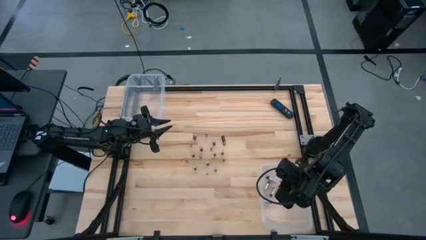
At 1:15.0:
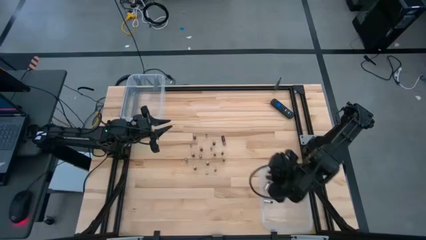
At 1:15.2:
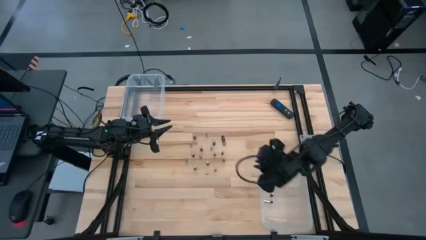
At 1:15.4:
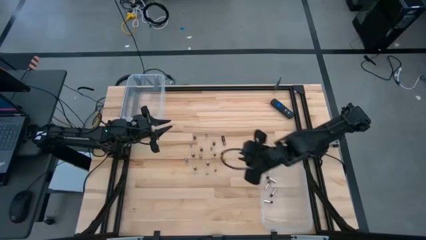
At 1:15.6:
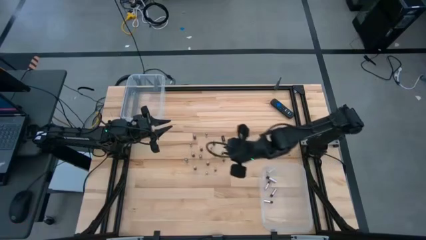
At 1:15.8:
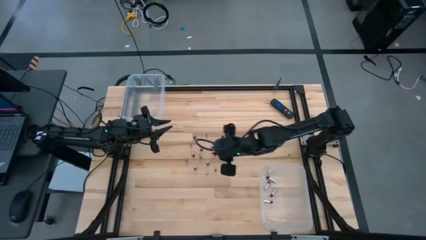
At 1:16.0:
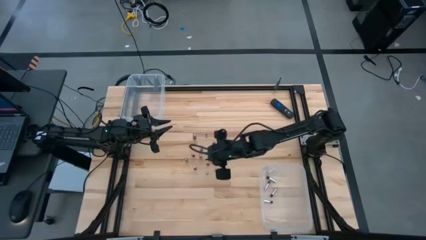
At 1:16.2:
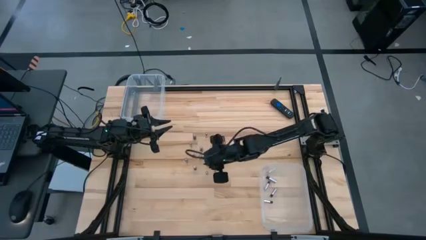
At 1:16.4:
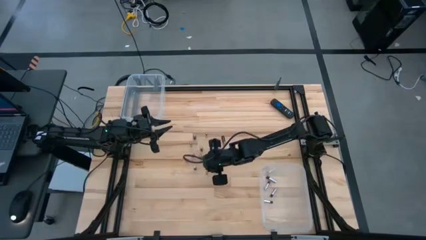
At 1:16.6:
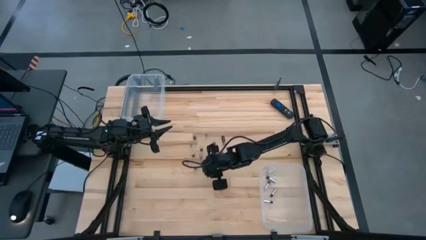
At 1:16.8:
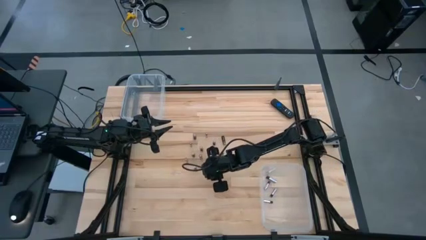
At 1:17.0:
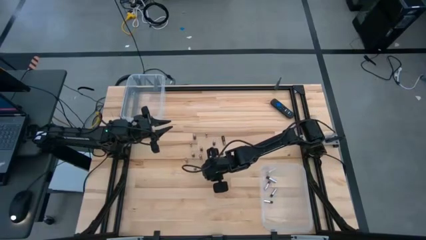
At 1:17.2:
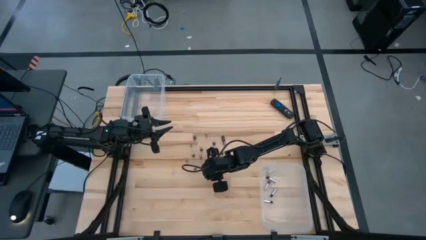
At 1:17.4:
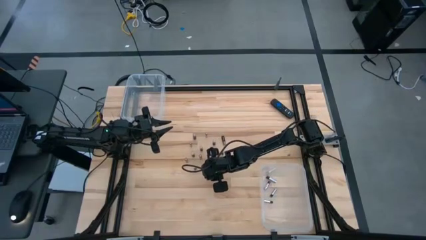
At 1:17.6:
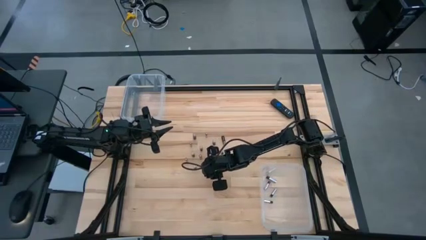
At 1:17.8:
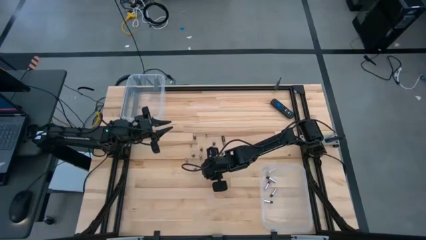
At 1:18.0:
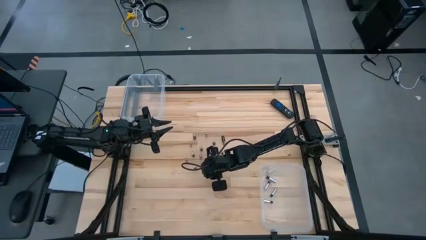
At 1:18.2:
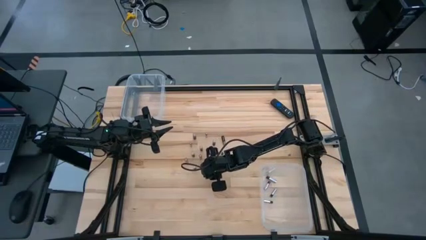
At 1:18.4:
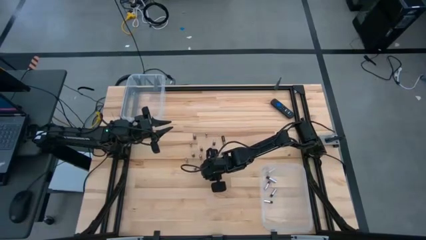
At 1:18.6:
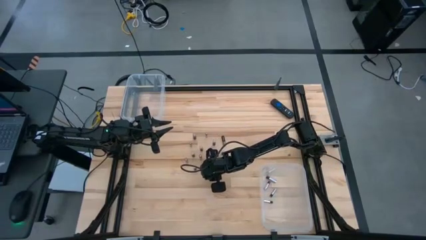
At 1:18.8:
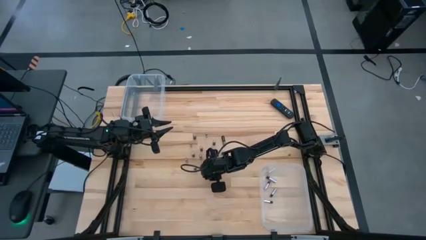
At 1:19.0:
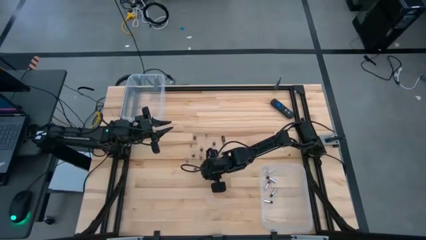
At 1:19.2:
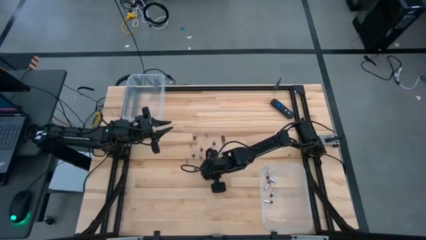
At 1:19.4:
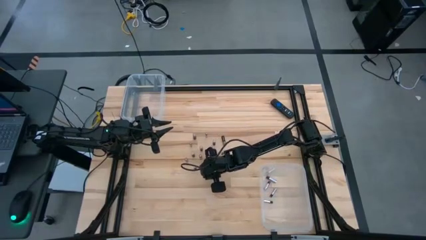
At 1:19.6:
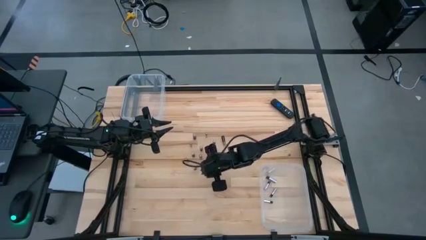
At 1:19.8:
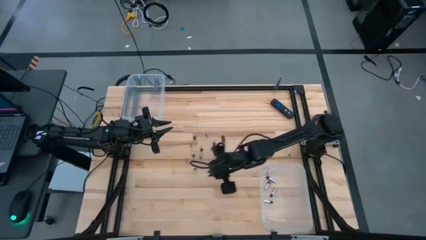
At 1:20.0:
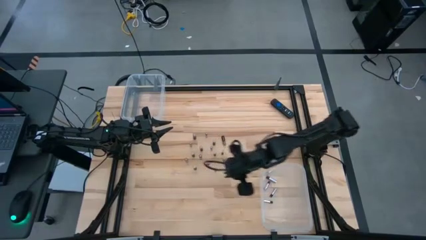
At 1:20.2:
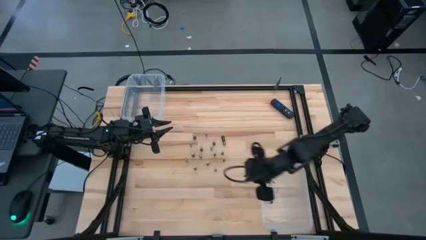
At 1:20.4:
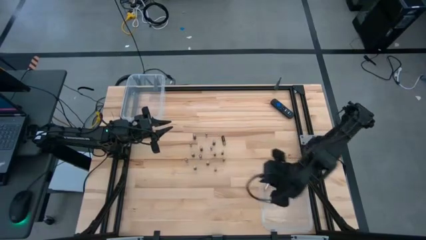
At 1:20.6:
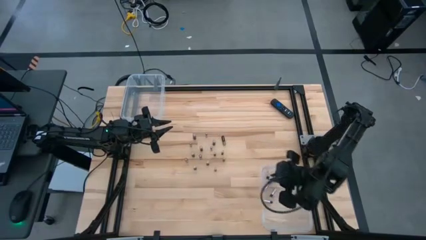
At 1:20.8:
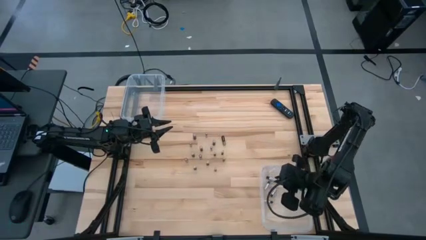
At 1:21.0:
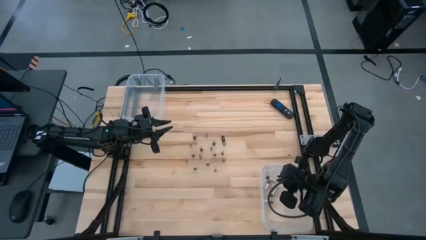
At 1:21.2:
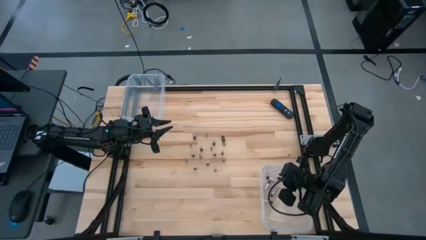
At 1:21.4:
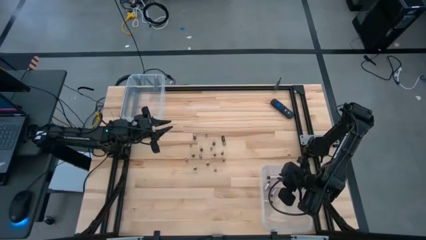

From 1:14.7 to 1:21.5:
Task: Sort batteries
Put the black and silver battery into the bottom transparent bin

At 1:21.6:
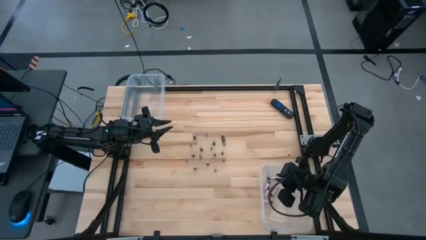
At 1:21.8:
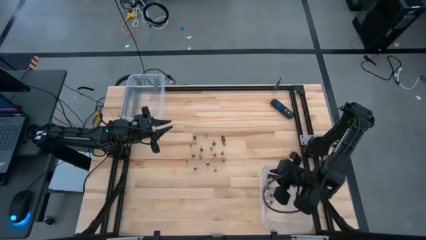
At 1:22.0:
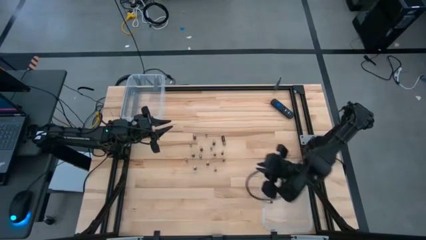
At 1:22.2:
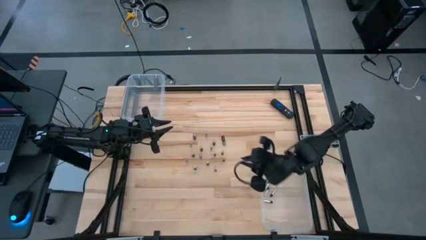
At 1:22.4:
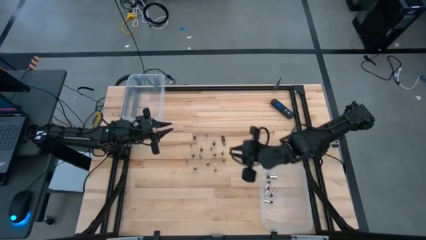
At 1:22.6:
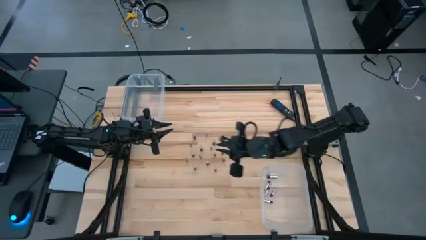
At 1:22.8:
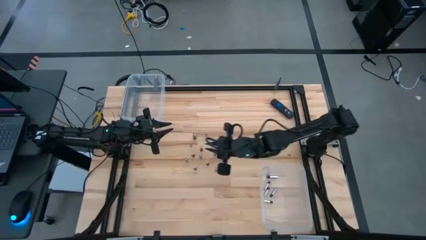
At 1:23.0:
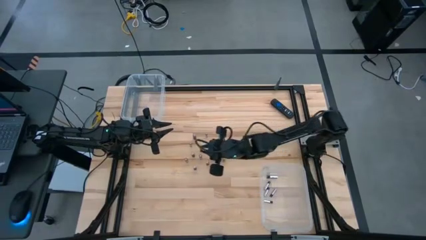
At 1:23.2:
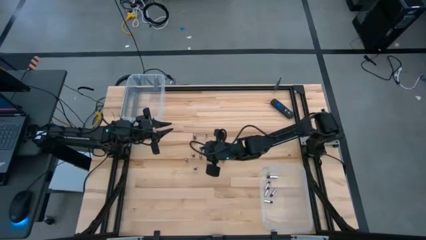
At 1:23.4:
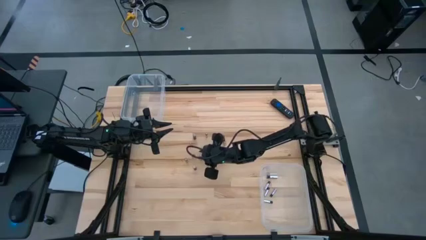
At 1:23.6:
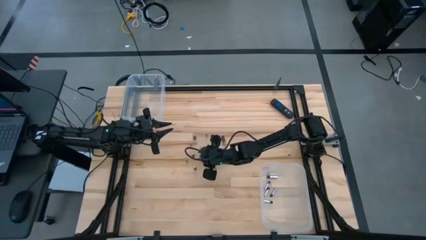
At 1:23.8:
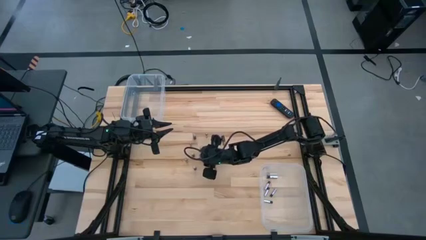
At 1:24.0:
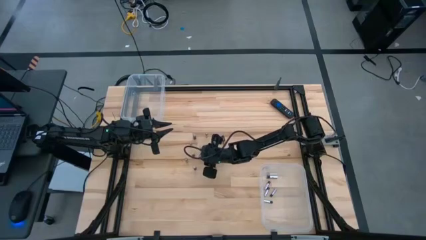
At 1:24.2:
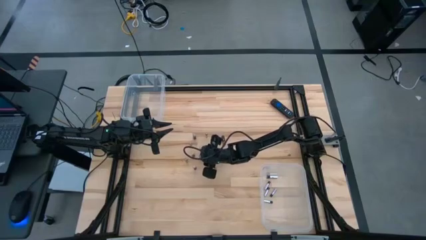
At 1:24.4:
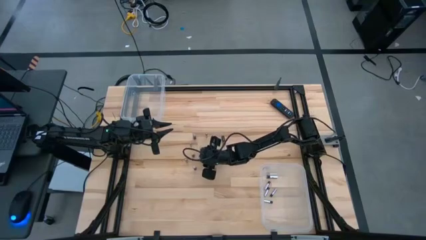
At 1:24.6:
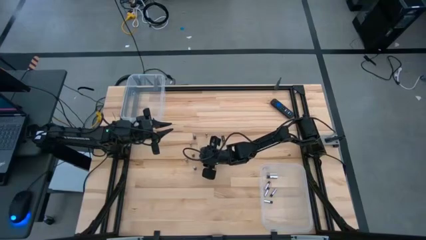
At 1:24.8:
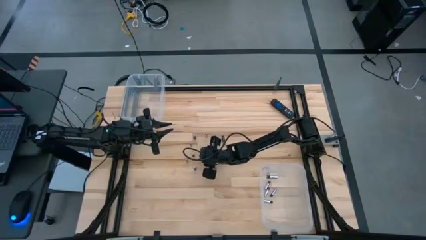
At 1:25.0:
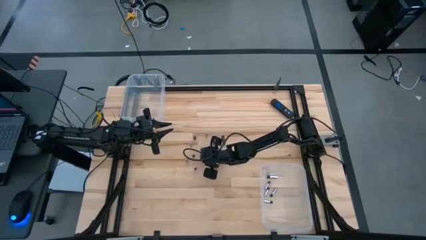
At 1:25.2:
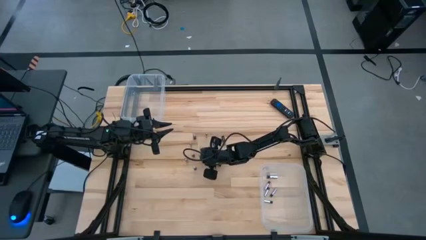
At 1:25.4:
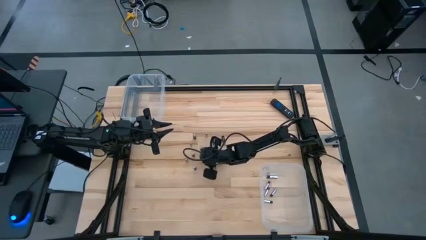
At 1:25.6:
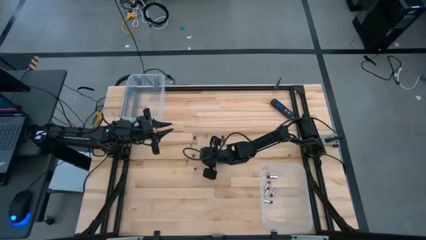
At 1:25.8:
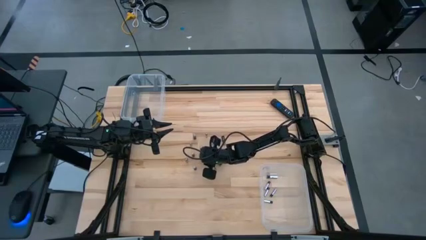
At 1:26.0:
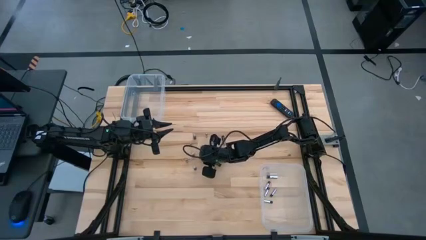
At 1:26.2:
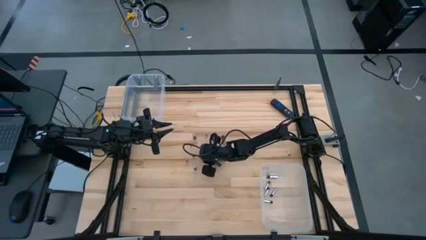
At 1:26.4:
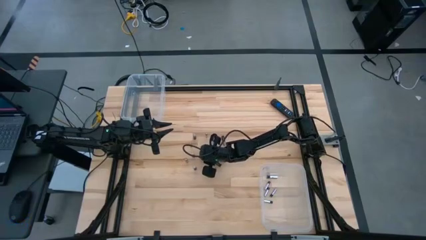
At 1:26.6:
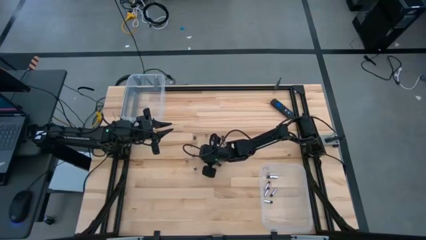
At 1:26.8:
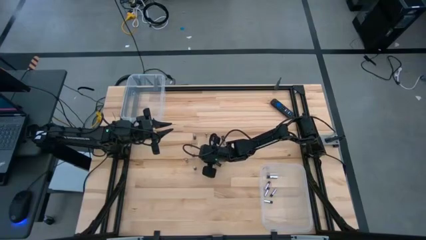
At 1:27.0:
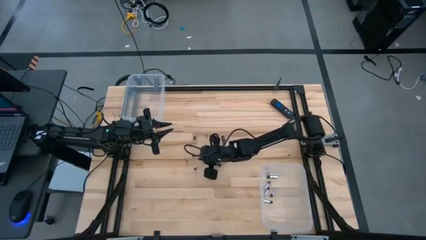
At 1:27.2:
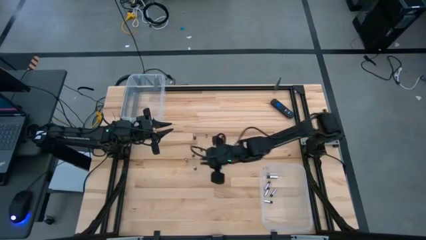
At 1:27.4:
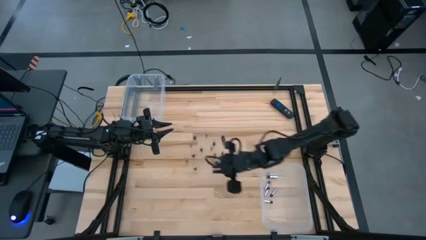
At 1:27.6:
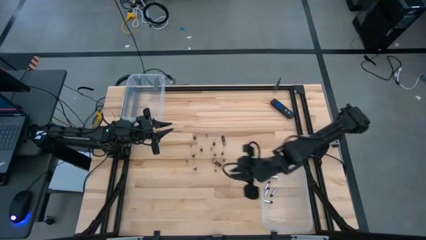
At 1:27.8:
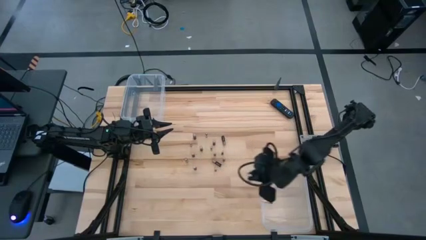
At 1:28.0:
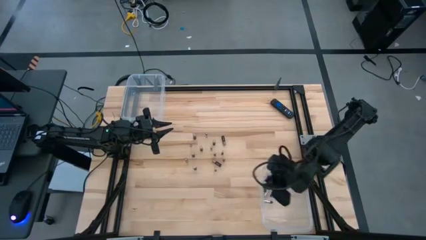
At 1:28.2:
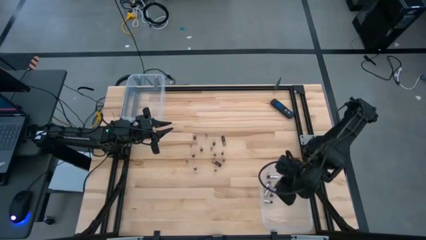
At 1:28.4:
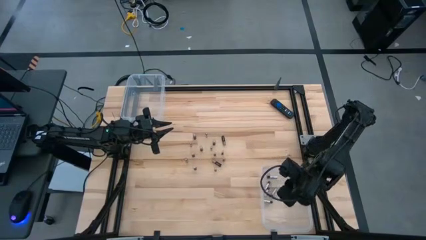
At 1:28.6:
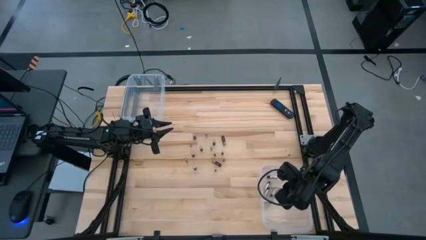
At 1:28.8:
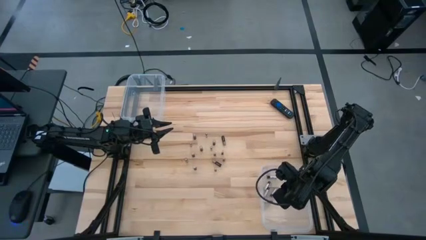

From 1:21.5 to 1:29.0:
Put the black and silver battery into the bottom transparent bin
